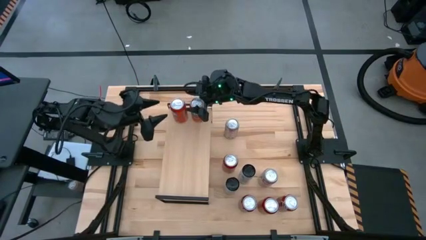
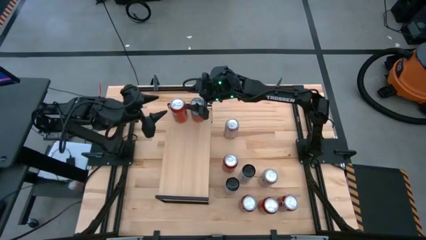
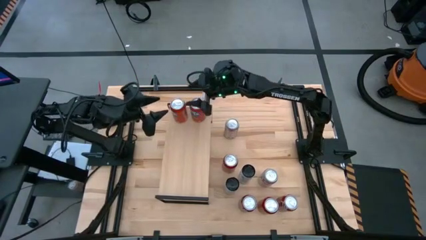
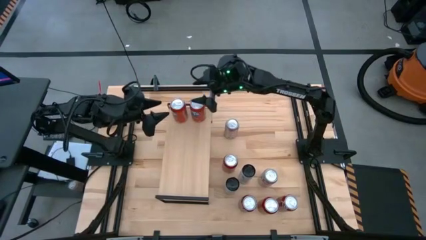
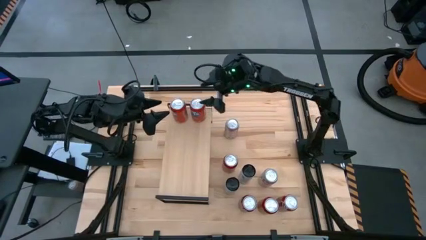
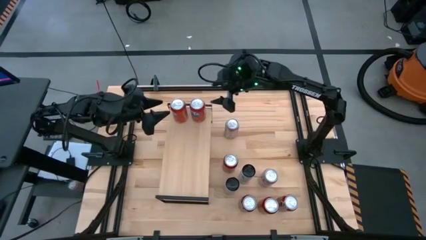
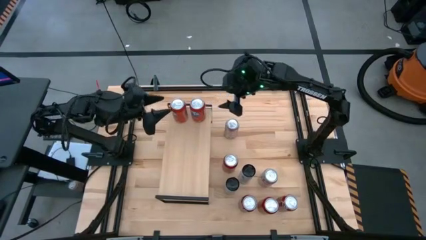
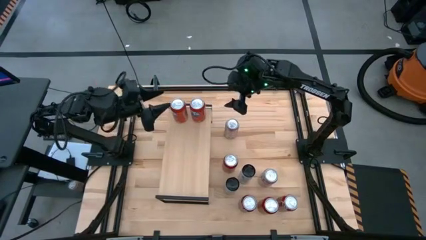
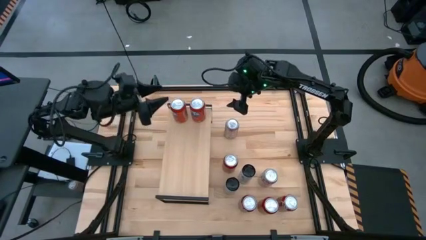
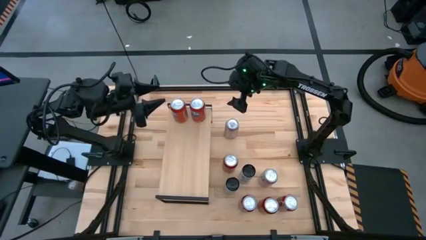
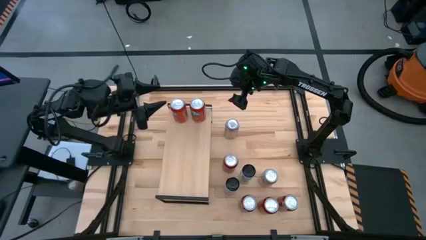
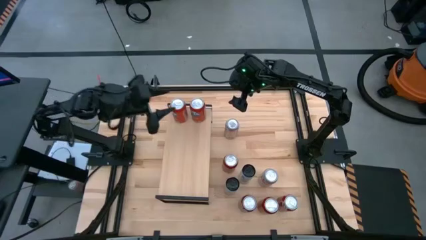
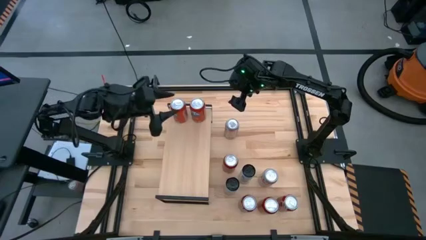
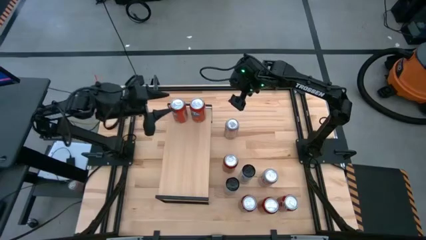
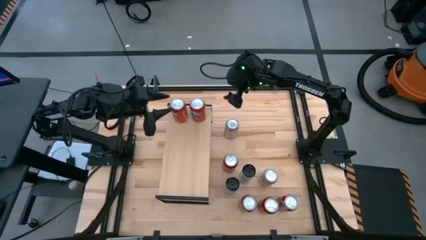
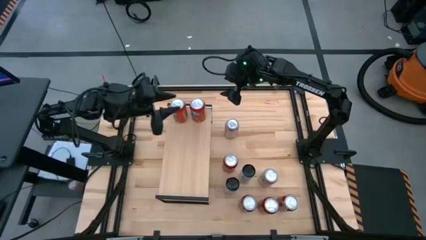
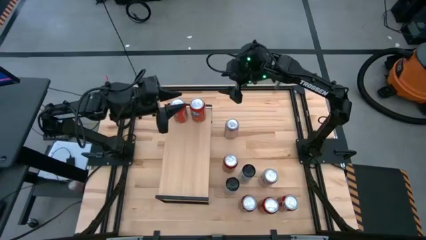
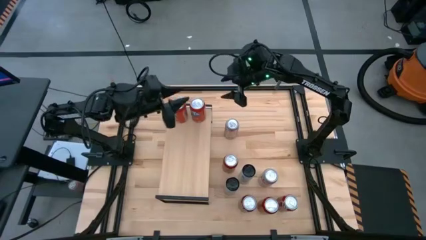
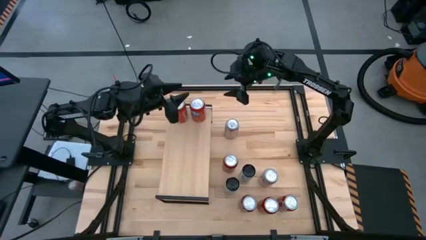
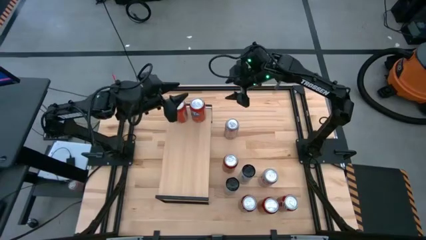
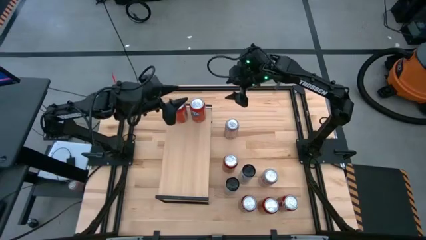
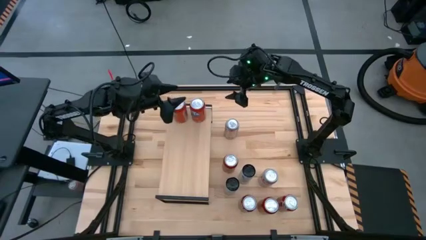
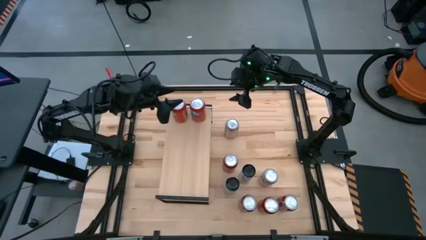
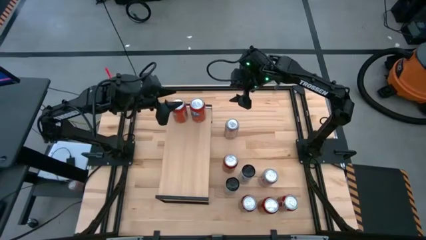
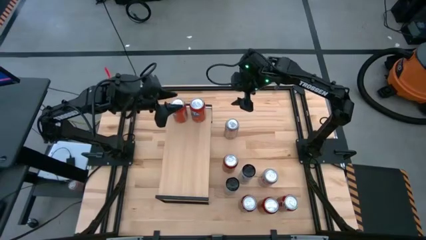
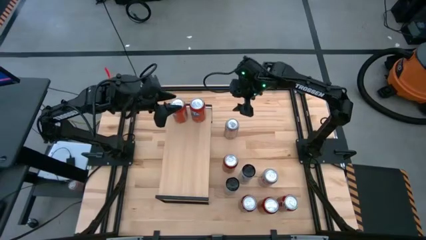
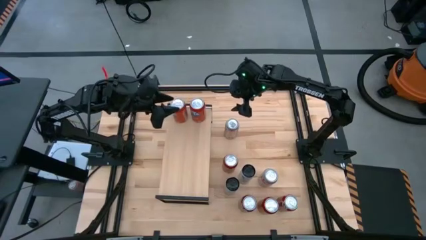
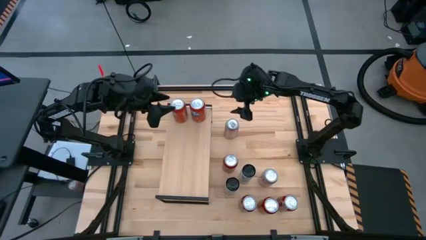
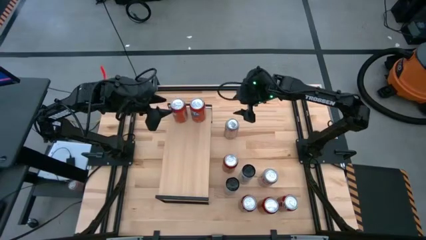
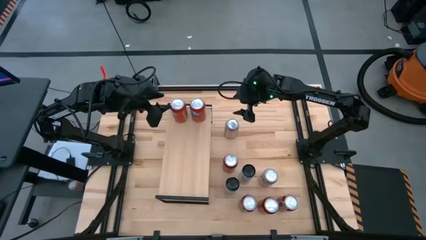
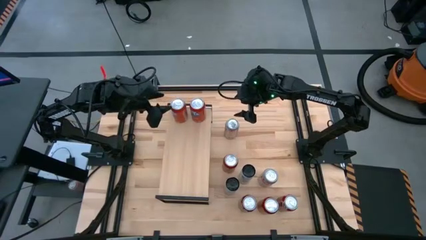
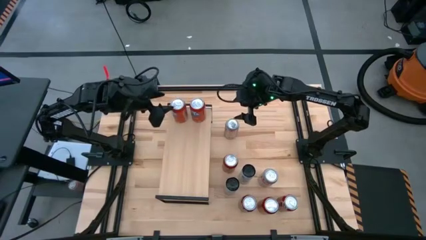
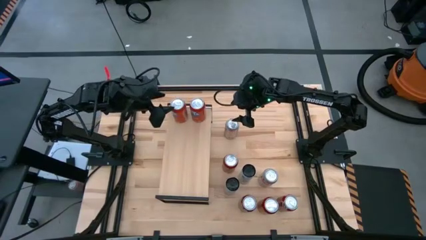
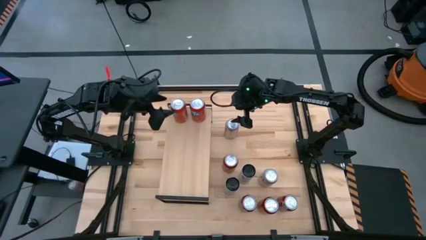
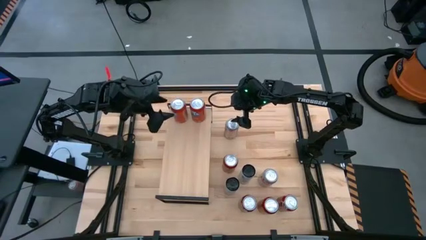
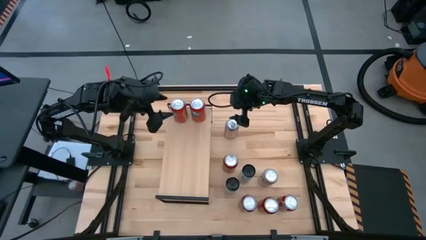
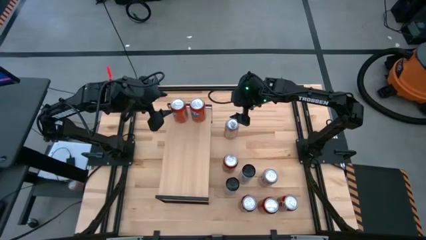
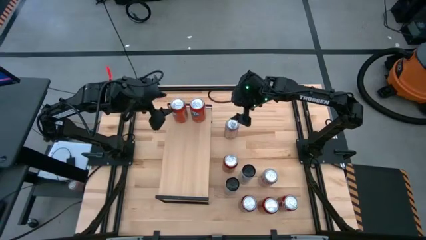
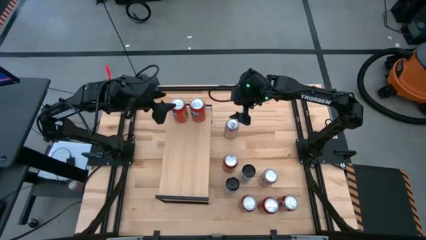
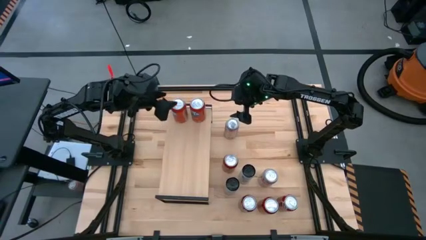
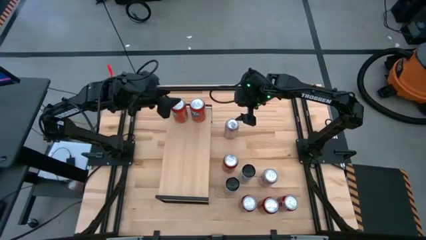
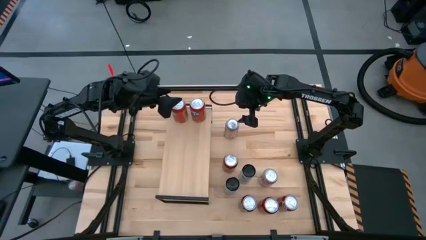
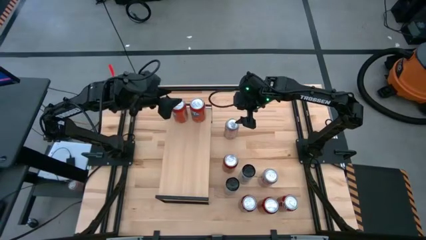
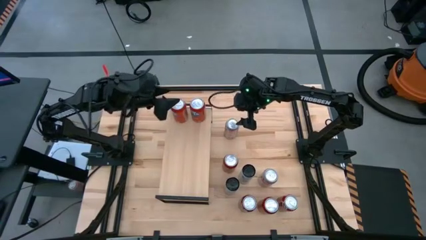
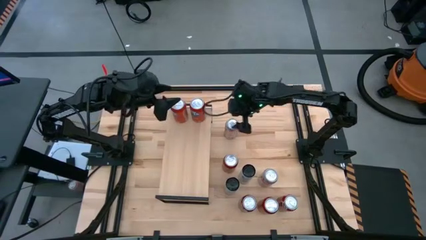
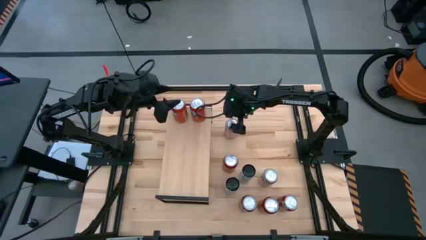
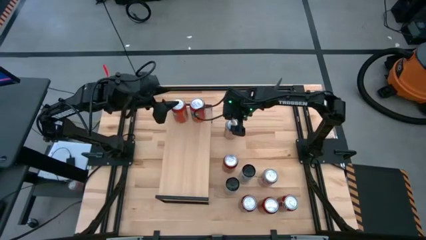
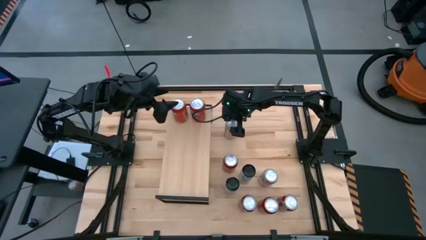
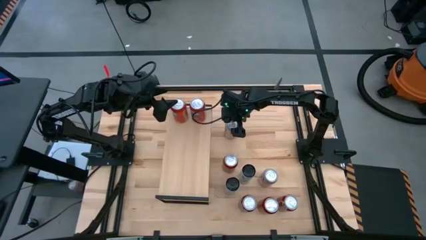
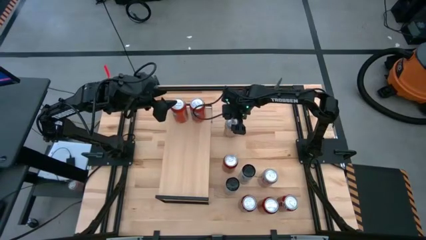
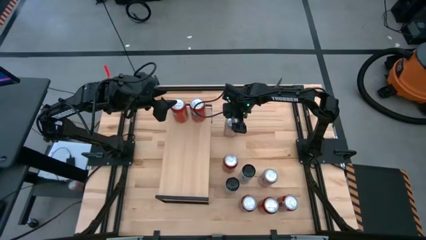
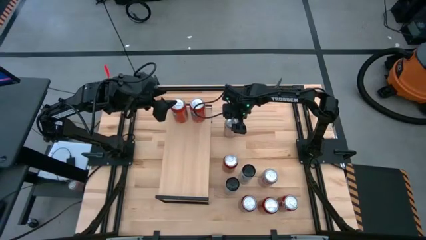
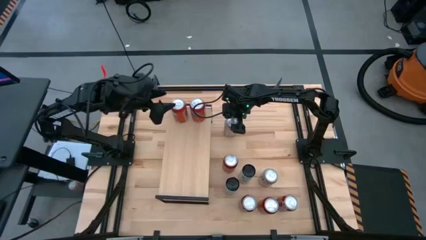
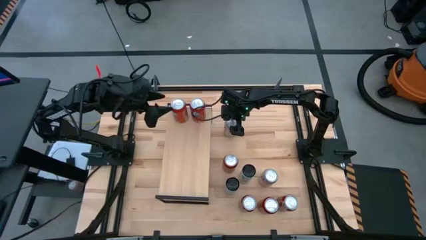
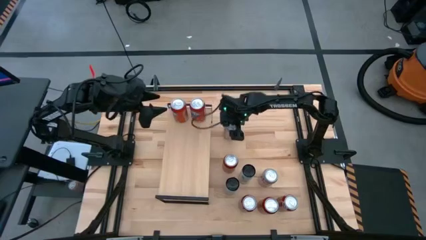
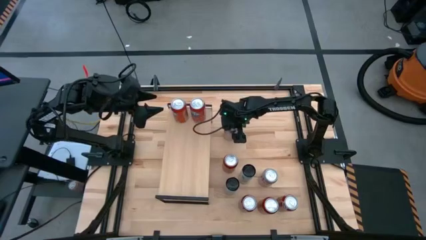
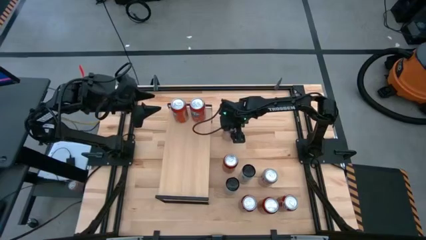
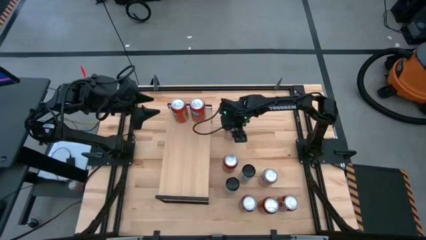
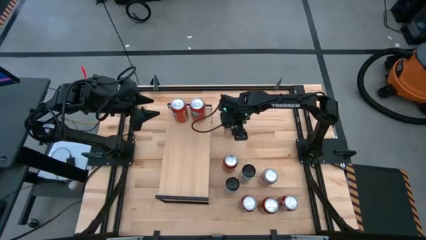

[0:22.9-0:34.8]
Task: Pick and place cans onto a shelf
Put the top red-silver soda can on the shelf
